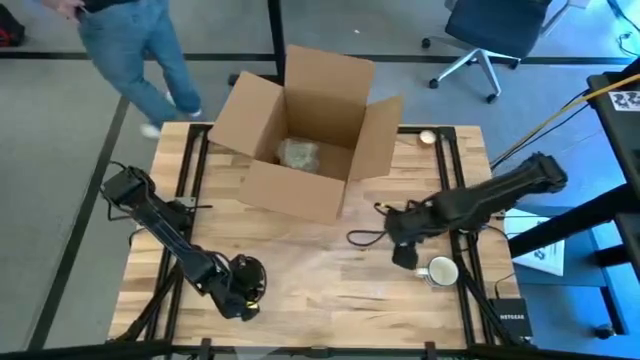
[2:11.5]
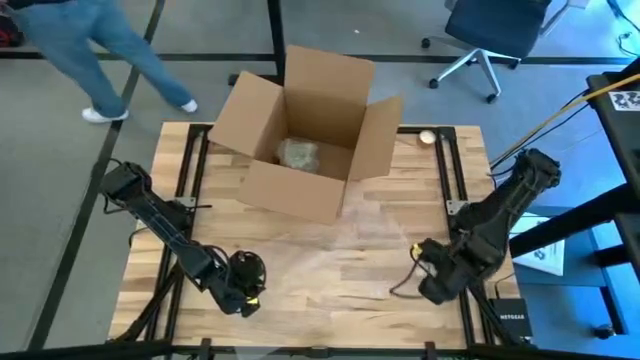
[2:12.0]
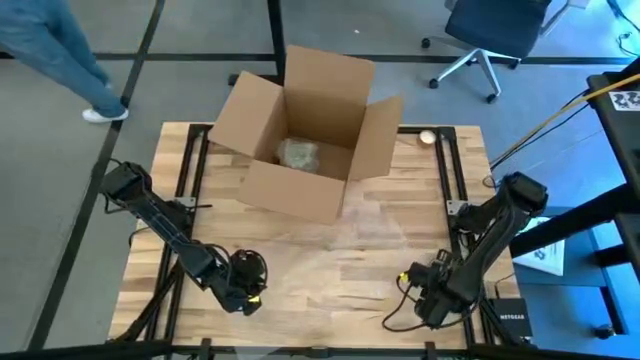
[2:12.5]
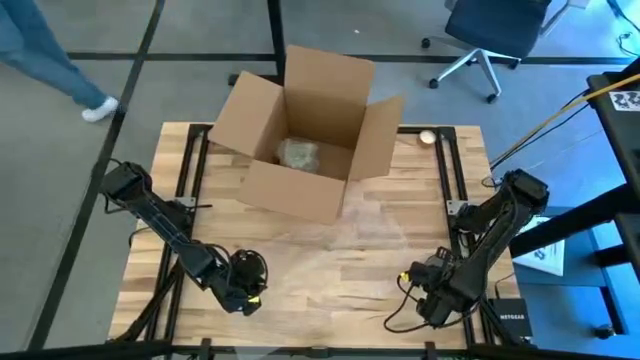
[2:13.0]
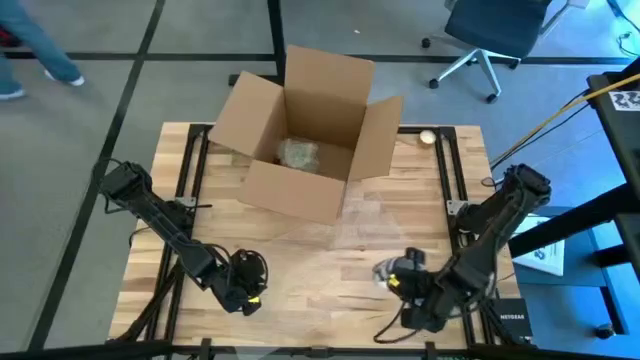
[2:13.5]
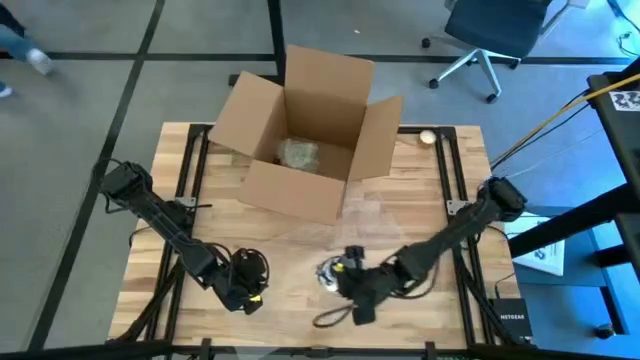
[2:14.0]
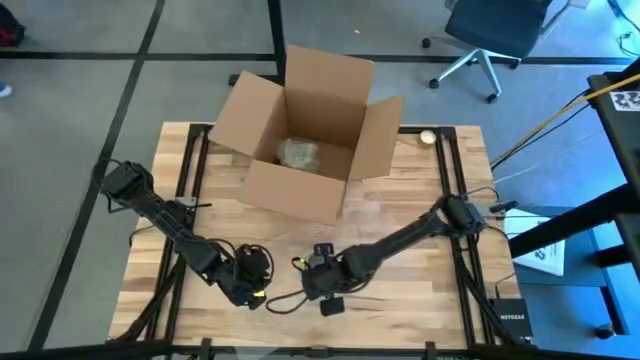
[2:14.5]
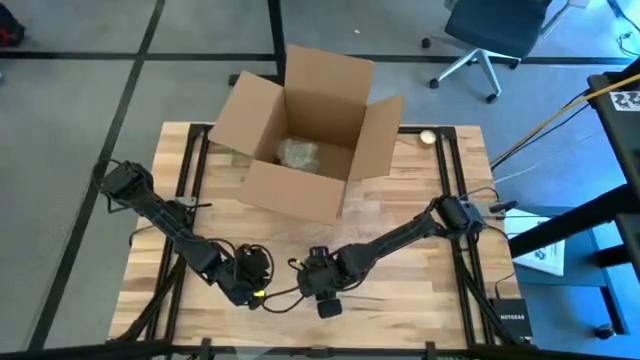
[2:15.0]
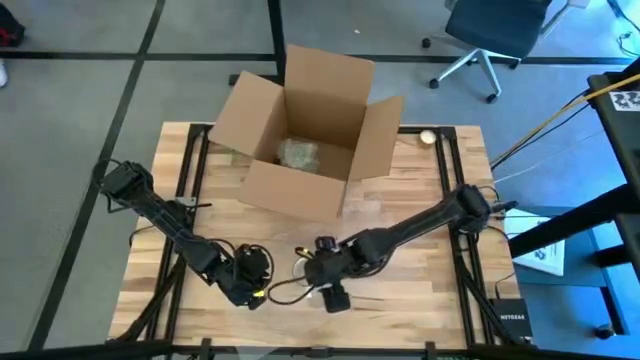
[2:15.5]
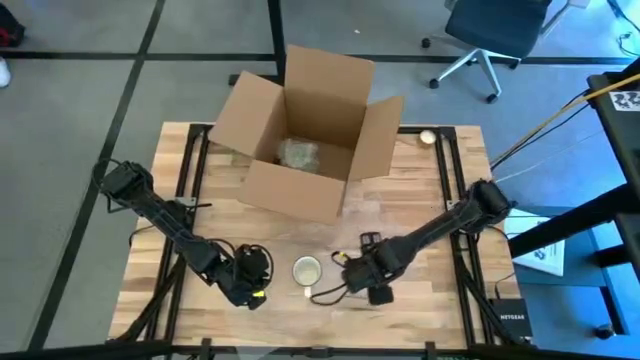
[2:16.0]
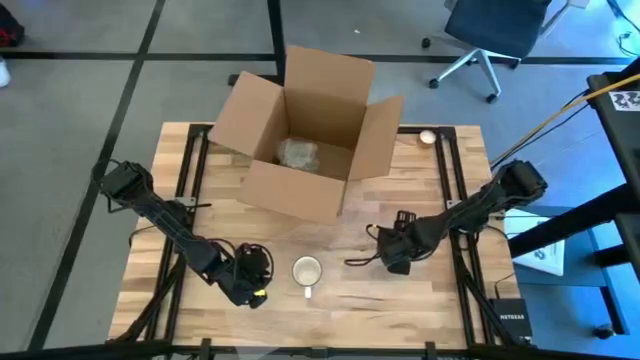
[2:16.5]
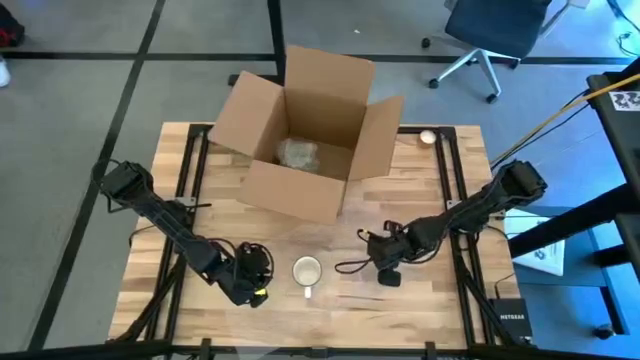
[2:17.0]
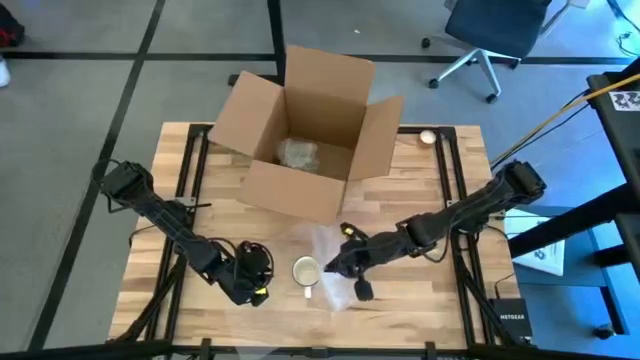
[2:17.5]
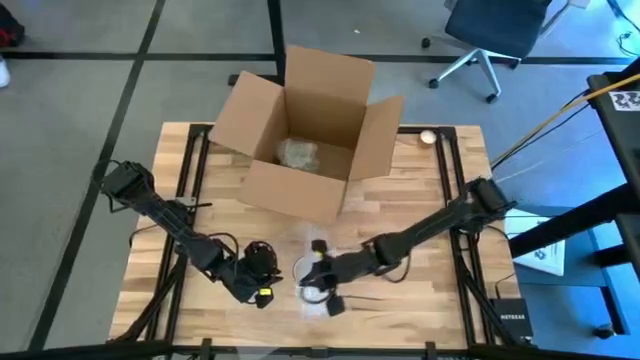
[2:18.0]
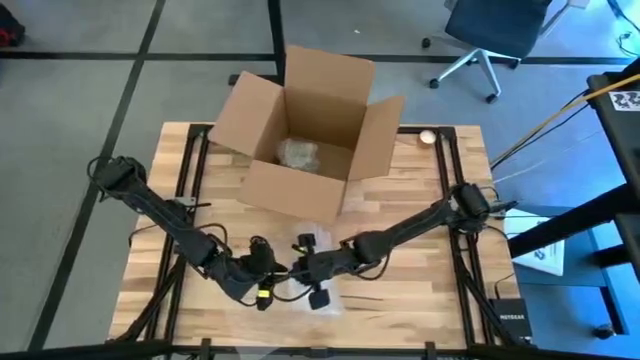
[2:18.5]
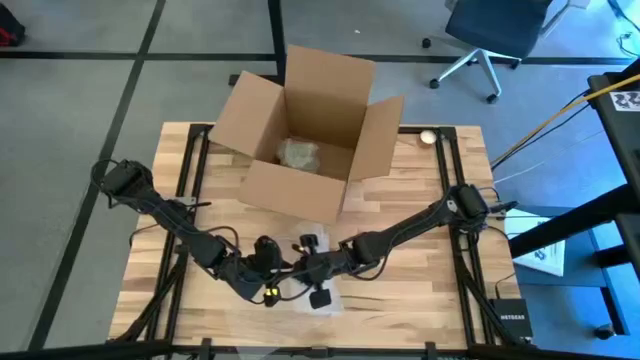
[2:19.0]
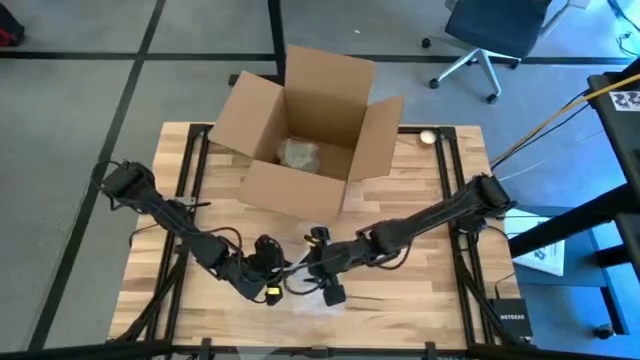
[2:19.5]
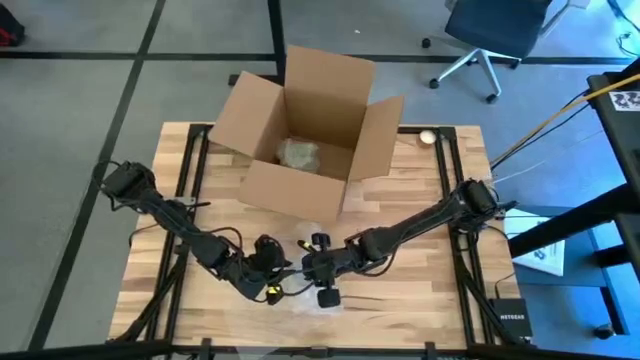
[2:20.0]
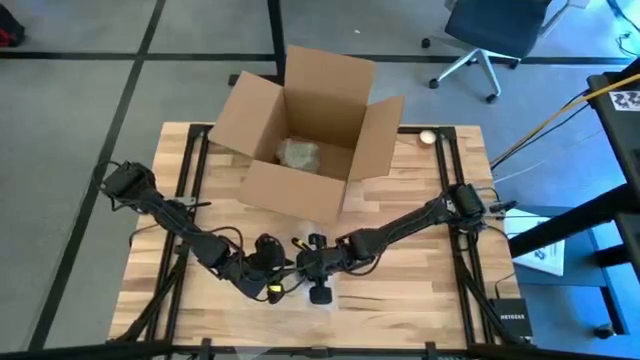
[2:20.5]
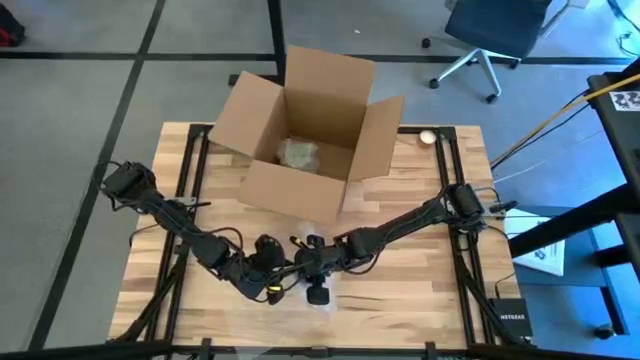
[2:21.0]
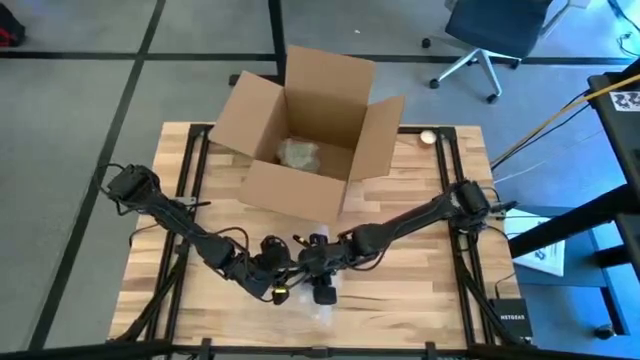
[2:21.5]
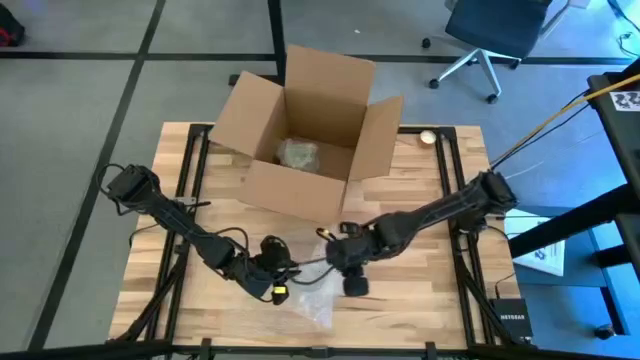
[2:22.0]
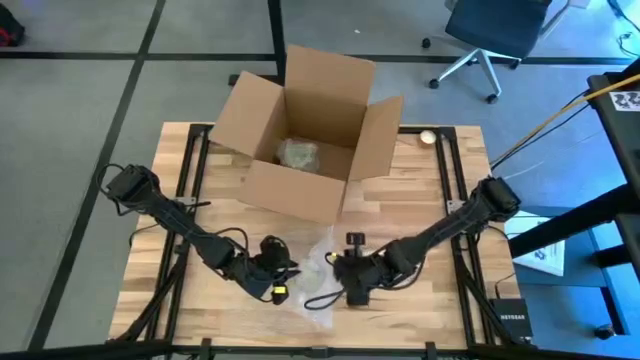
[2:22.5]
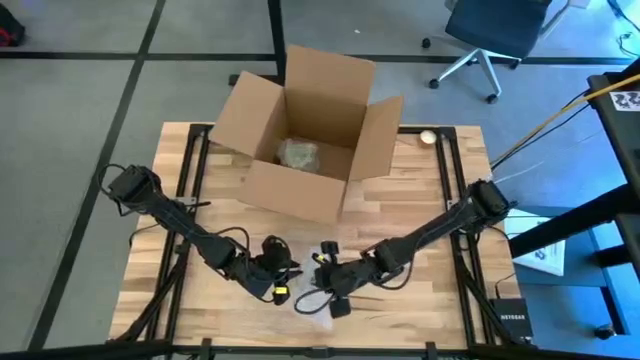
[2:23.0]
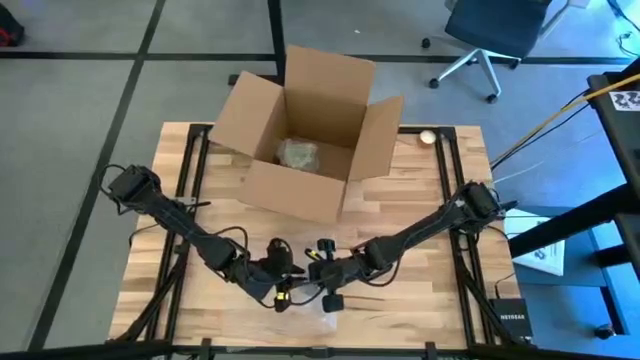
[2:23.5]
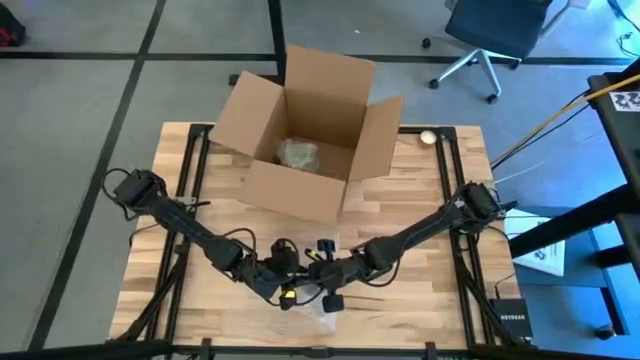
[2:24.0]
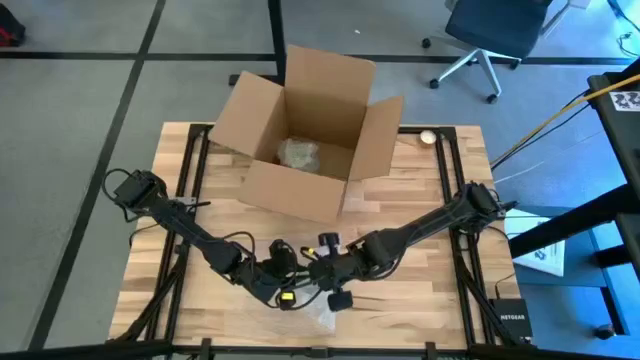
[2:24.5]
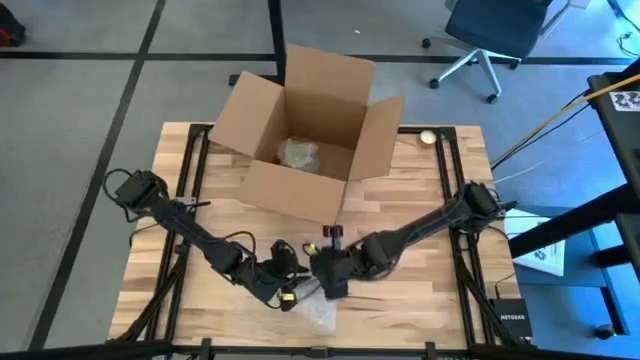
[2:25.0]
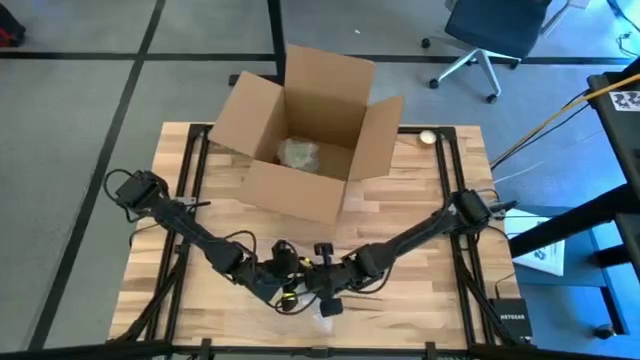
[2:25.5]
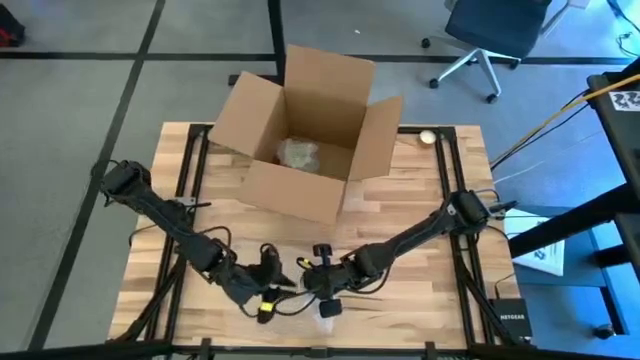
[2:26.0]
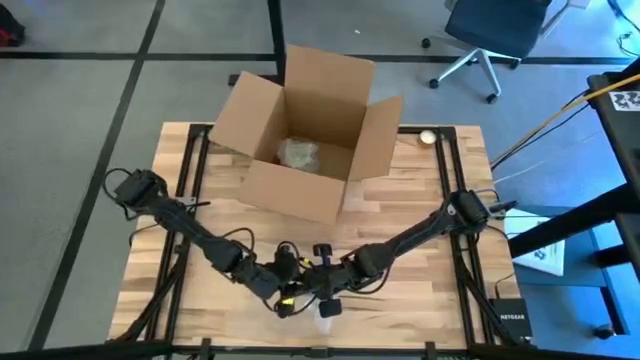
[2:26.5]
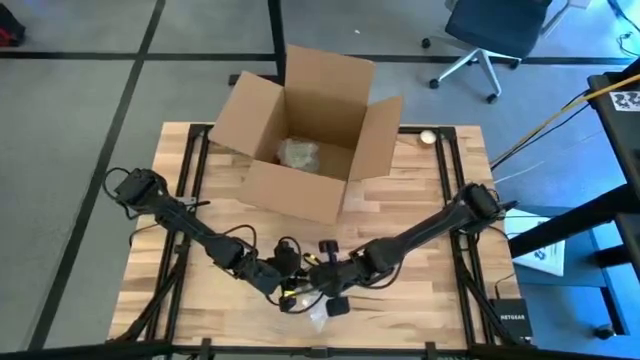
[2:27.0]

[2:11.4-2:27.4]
Task: wrap mug
Wrap the blue mug with bubble wrap

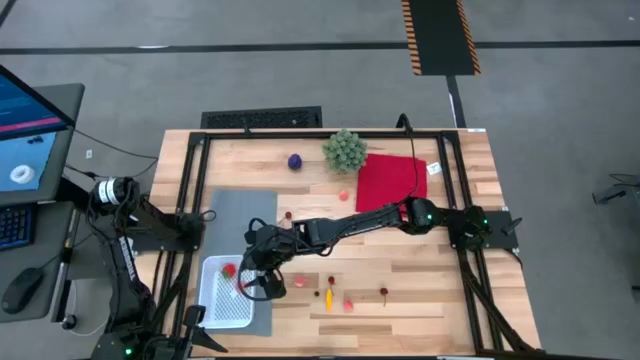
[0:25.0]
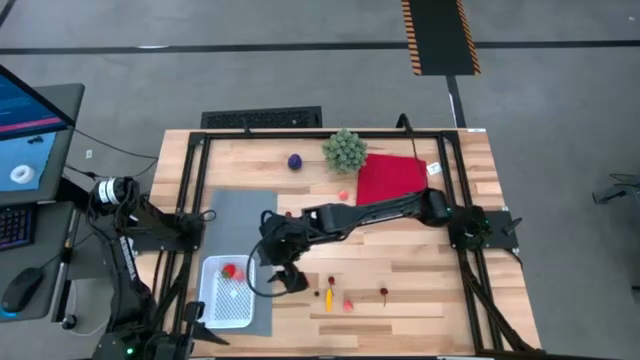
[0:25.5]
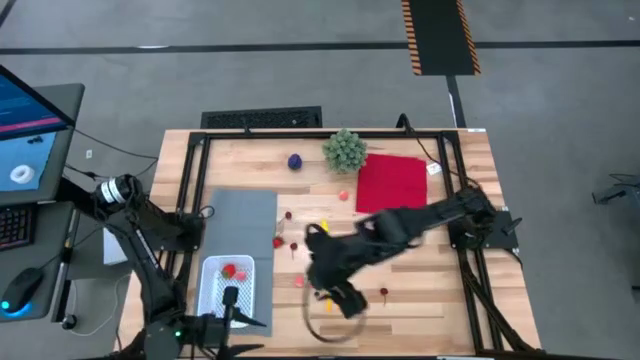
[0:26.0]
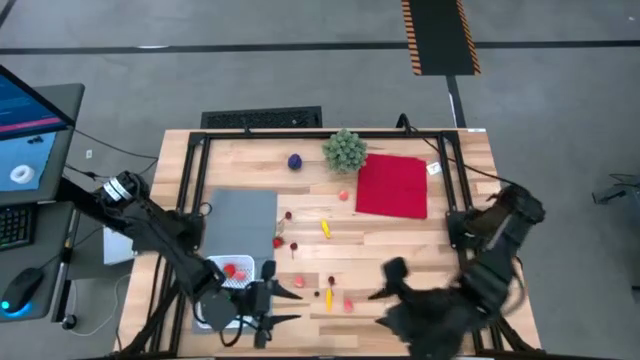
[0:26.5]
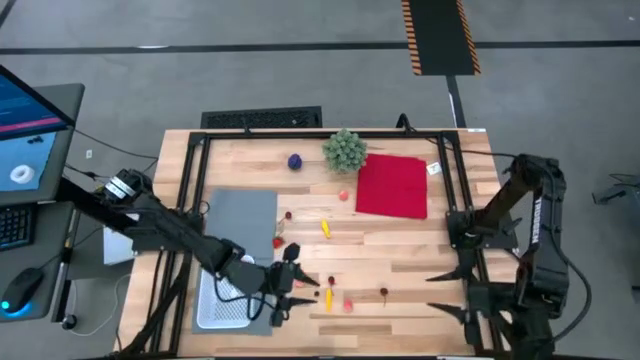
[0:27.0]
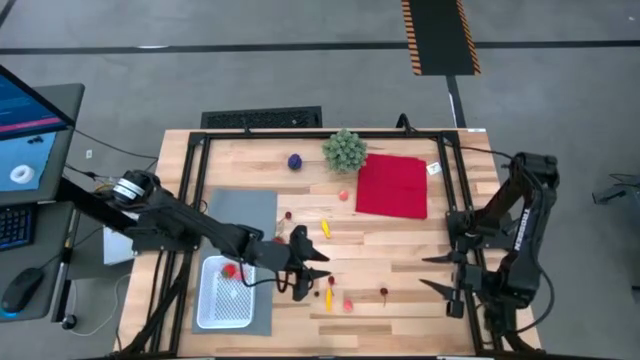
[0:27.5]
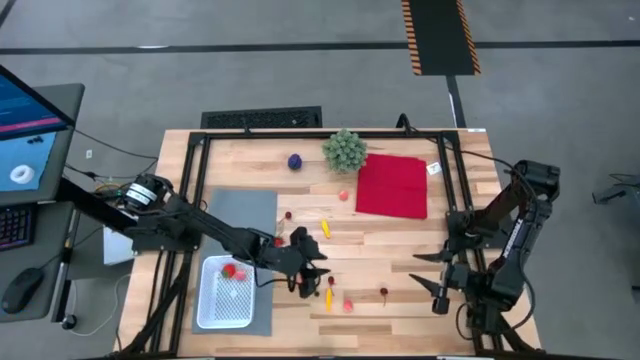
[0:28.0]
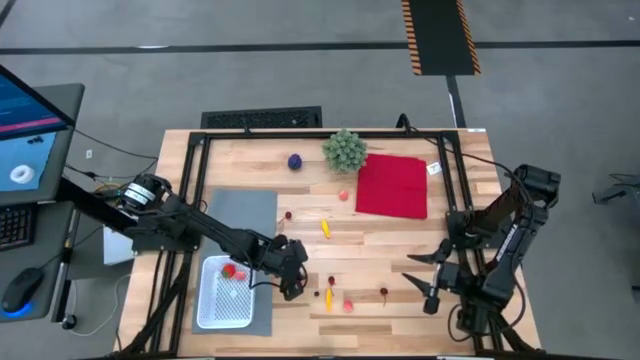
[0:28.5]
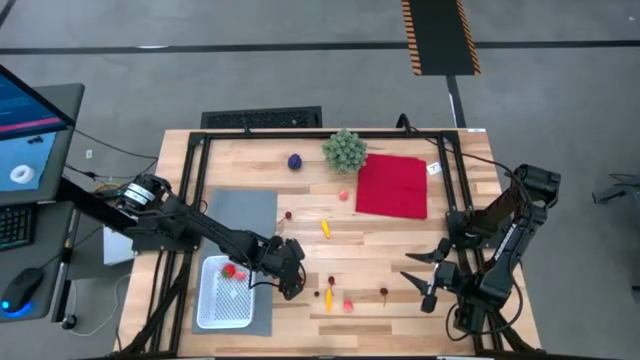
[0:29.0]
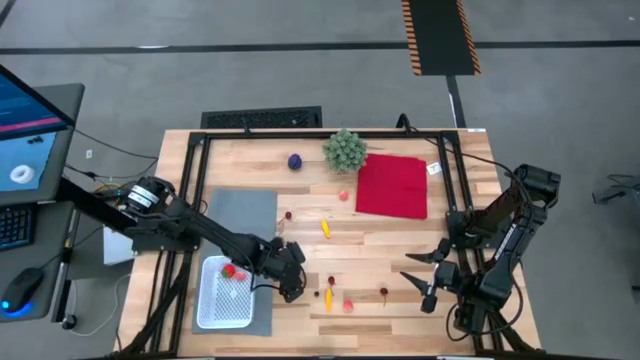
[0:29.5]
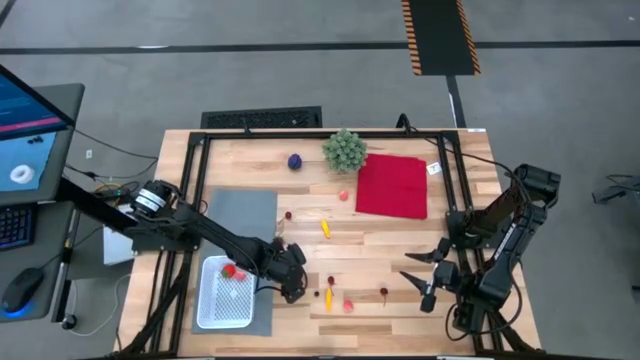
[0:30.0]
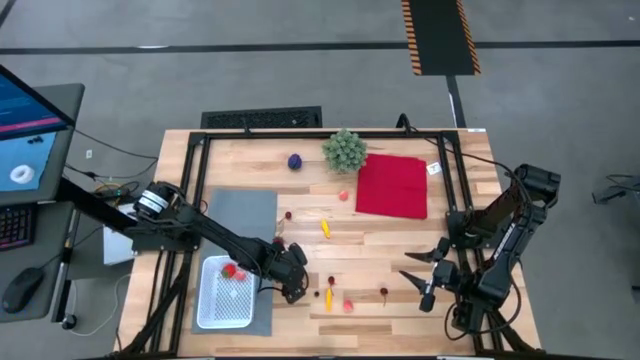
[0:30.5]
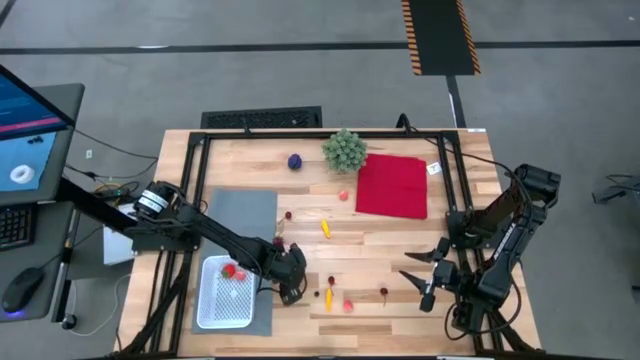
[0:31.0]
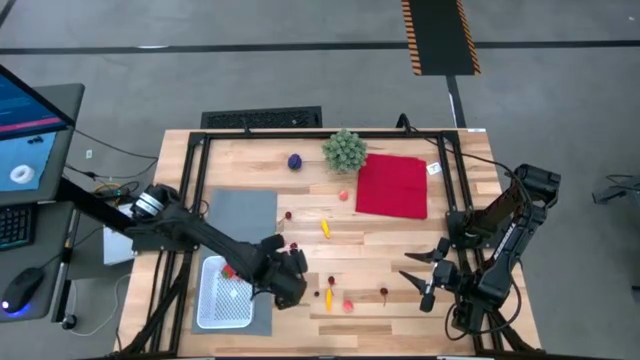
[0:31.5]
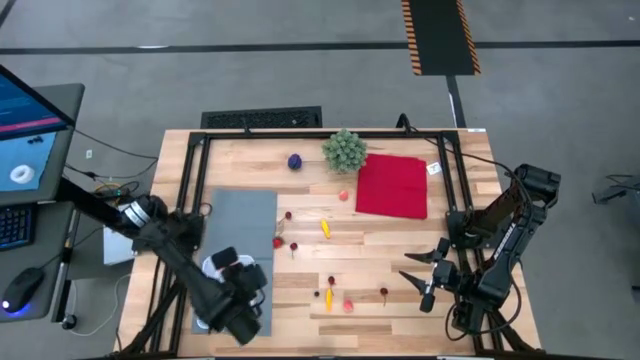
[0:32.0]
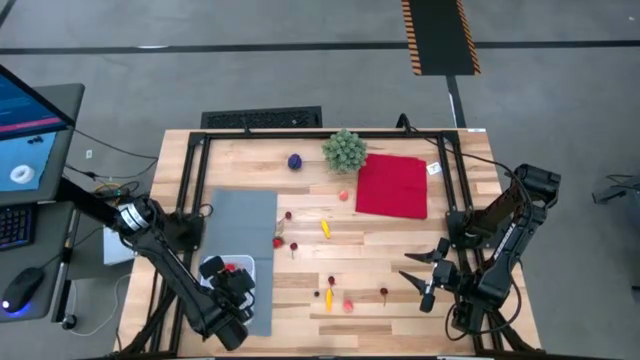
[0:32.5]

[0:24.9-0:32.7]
Task: Pick and placing Produce into tupperware
Put the pink apricot into the white basket
